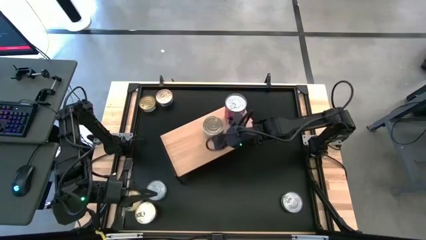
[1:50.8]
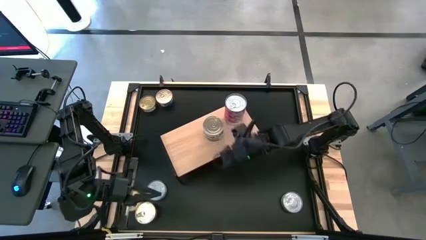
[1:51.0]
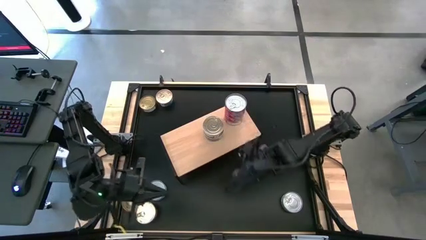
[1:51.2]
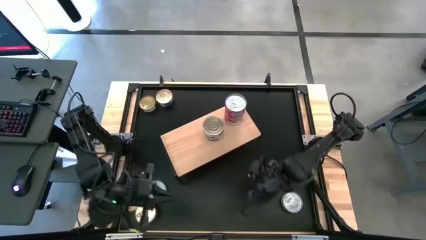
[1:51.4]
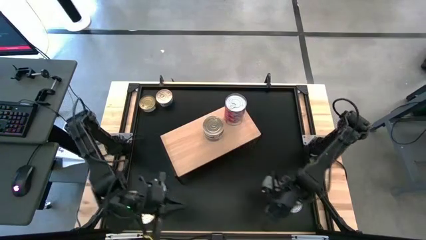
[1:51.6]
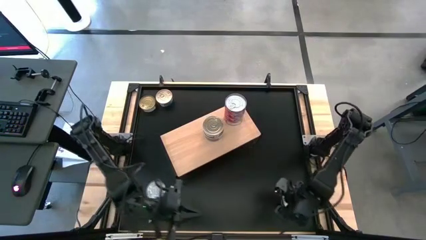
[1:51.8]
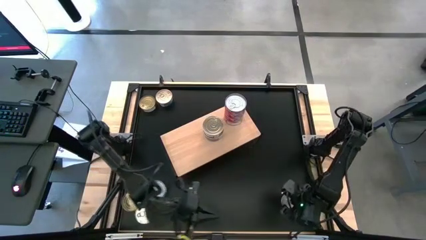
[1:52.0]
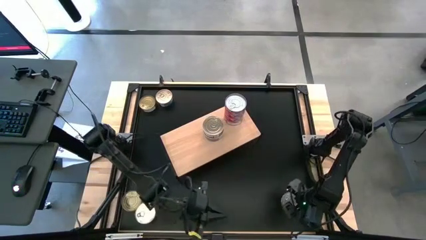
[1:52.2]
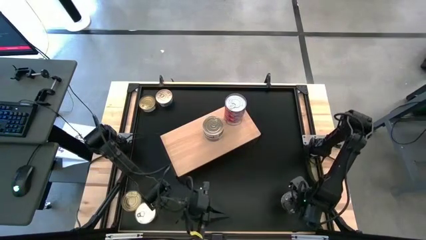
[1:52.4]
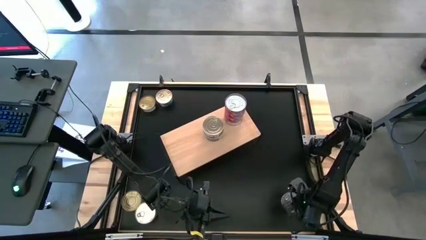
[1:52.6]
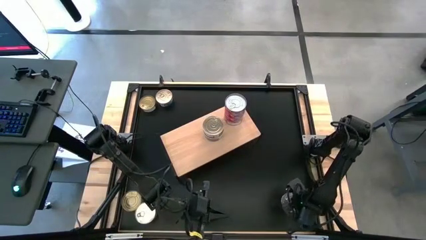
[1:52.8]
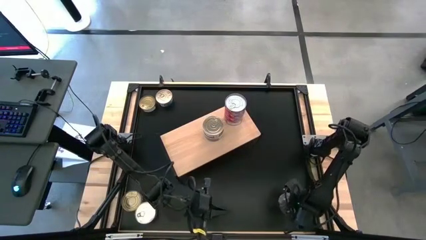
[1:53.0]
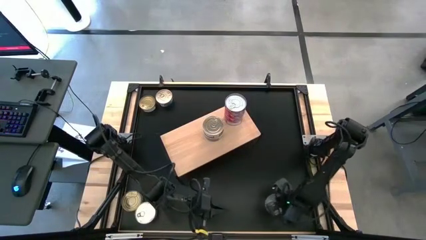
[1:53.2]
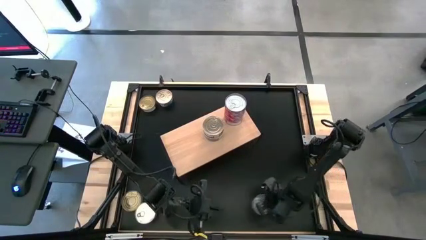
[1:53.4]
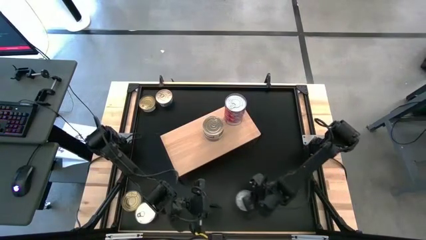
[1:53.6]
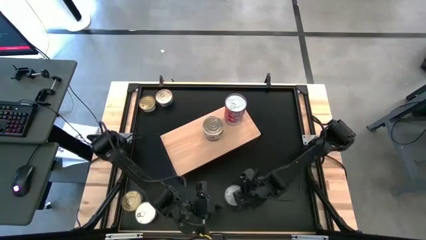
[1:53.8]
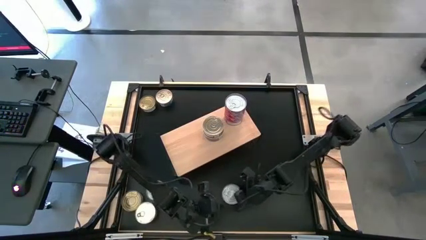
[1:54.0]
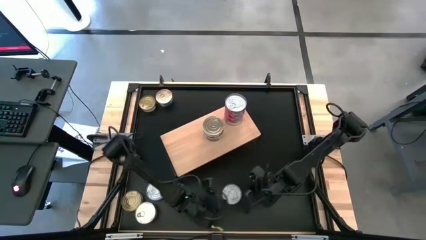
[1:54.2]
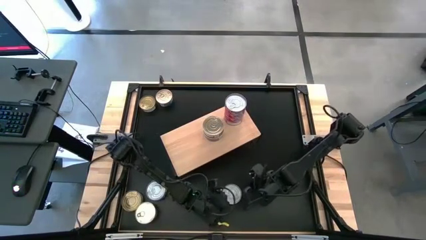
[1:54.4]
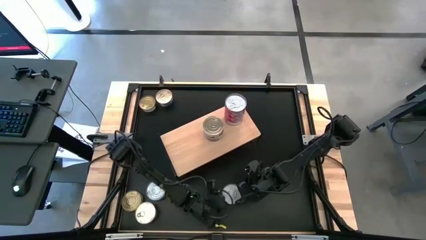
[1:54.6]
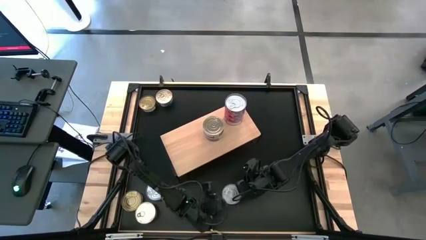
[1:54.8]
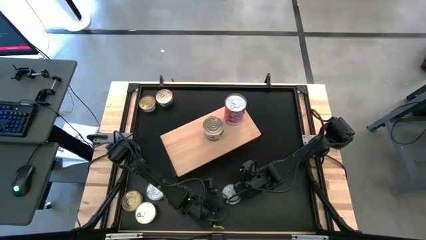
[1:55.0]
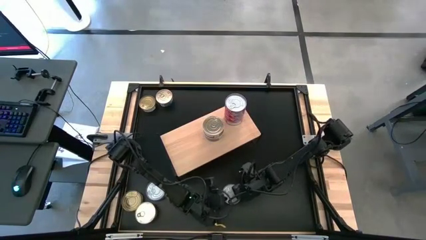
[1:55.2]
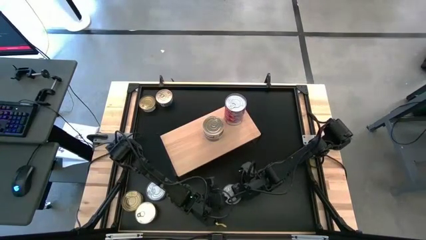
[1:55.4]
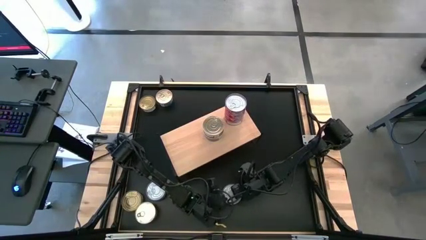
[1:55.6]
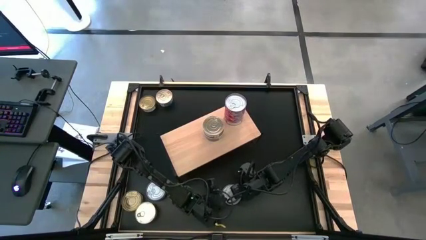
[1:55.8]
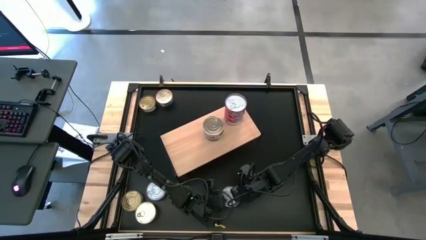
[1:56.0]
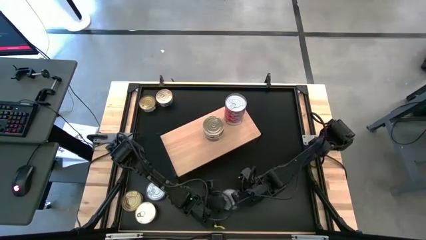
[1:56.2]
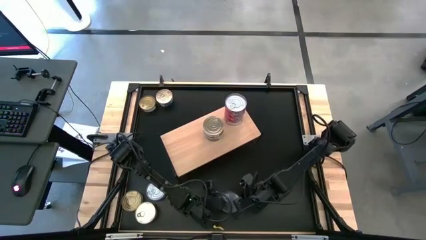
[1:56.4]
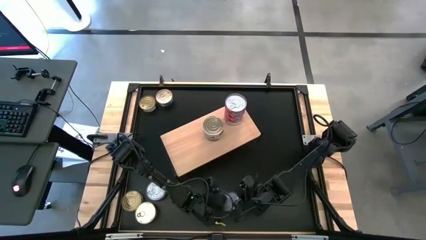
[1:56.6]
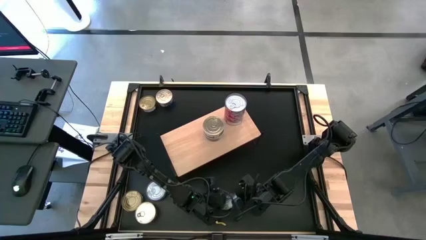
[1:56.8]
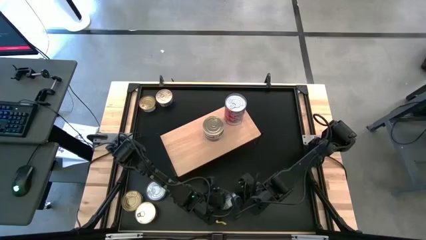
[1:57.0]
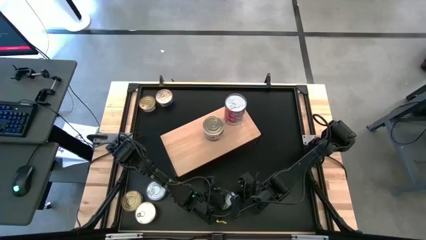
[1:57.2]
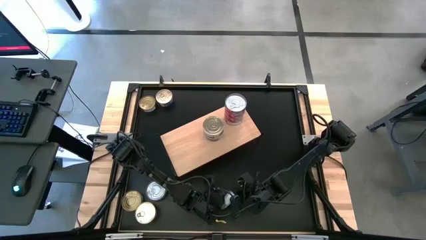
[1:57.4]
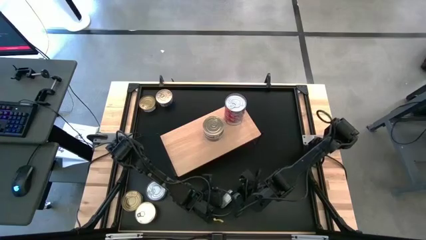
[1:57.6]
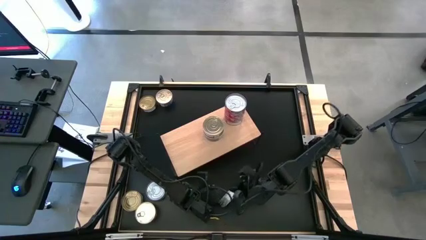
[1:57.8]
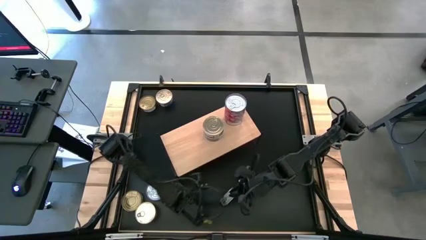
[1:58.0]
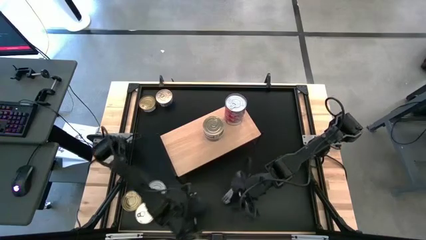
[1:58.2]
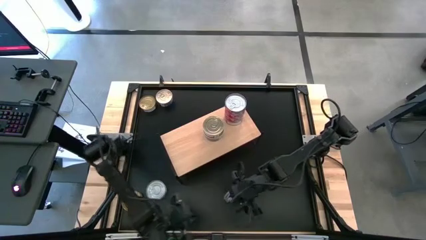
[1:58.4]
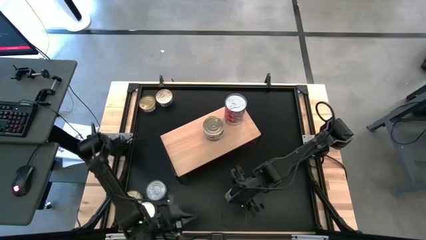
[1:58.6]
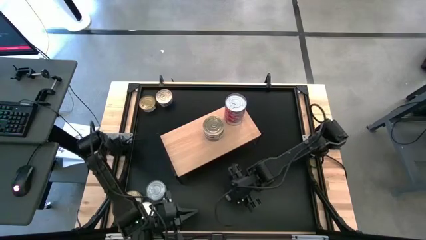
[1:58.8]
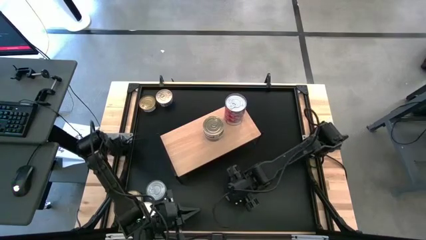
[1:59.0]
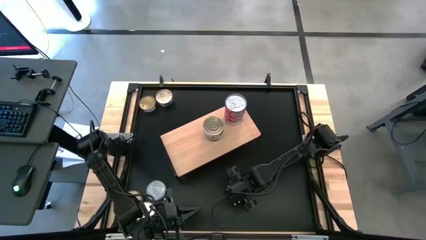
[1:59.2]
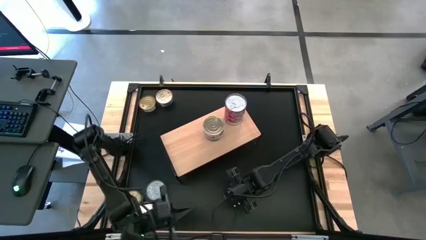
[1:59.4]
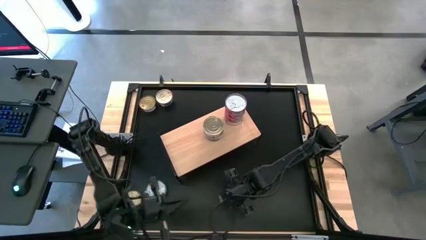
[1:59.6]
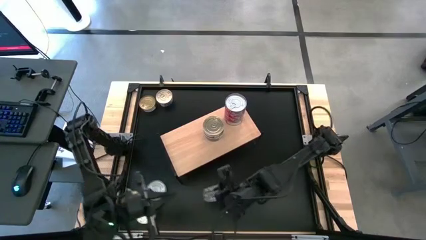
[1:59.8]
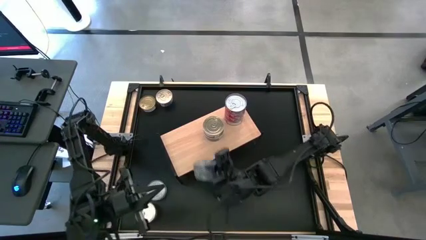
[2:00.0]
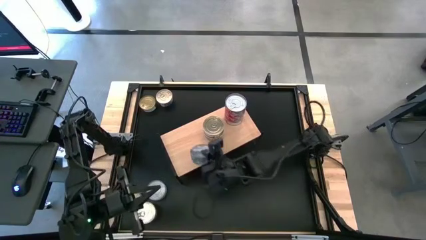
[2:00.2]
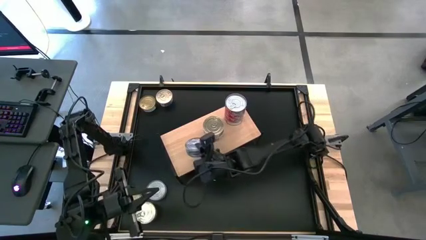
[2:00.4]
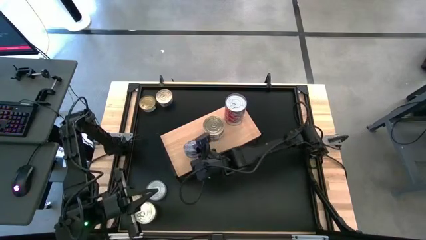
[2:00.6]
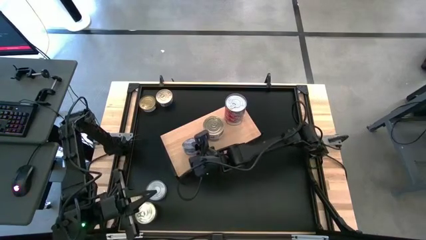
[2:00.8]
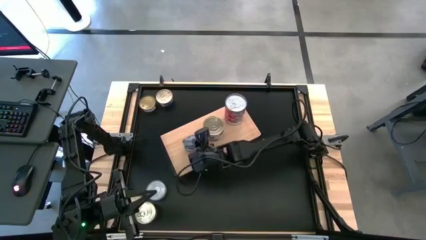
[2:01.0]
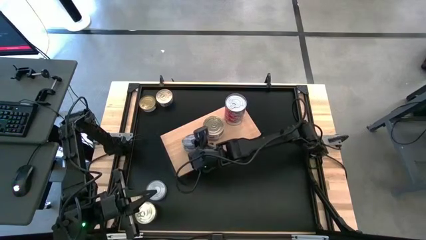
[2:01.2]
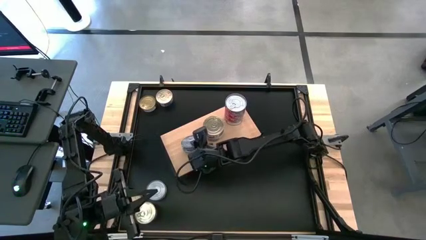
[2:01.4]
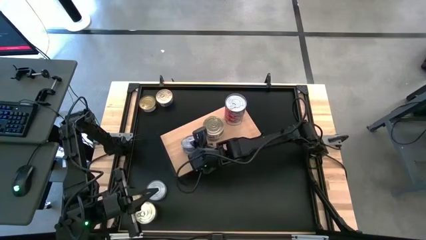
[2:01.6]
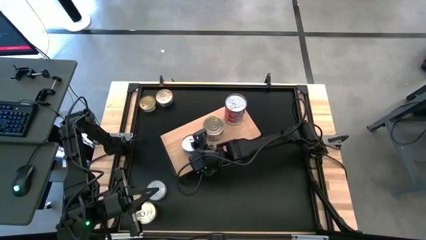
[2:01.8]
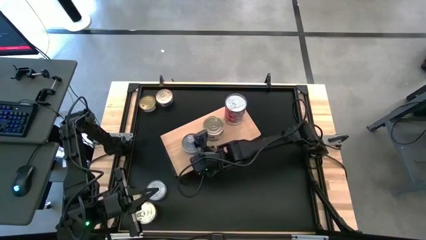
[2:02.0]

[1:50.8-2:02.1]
Task: Stack canned seafood by type on shelf
Put the green-white tuna can on the shelf

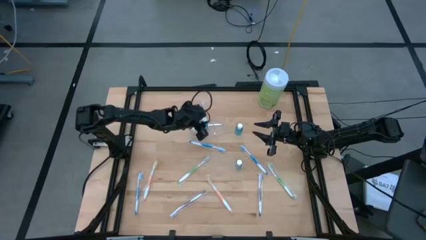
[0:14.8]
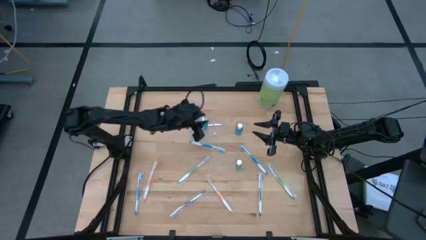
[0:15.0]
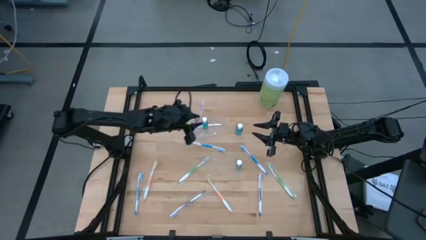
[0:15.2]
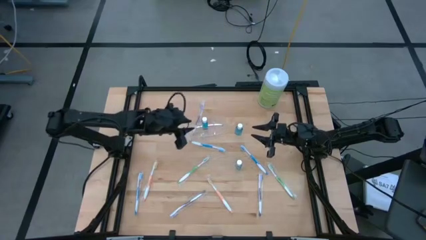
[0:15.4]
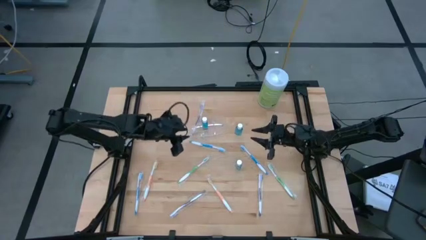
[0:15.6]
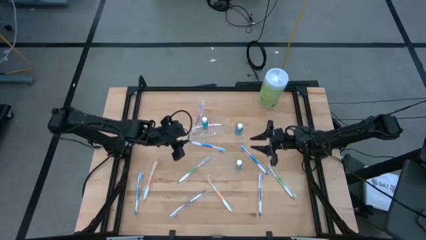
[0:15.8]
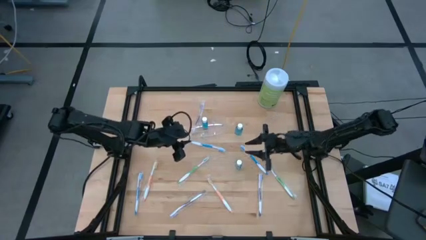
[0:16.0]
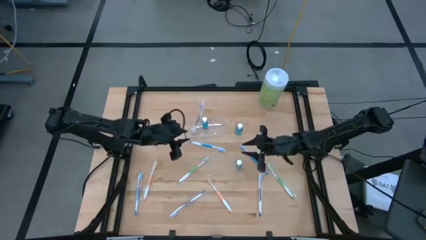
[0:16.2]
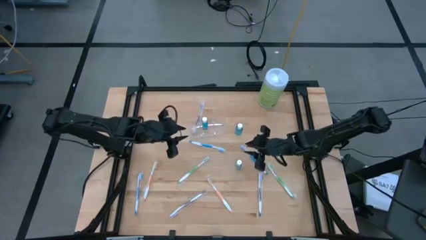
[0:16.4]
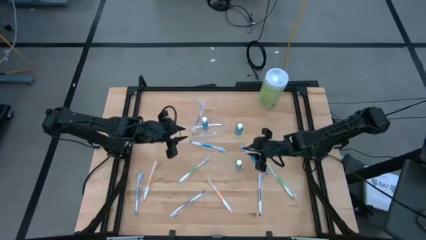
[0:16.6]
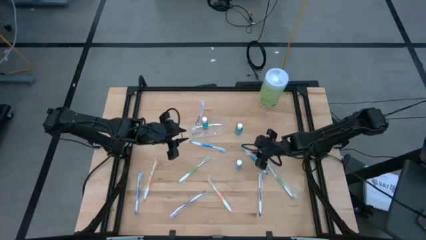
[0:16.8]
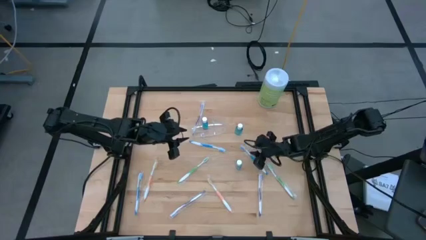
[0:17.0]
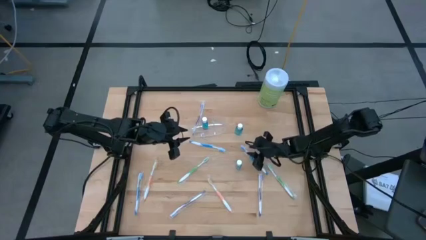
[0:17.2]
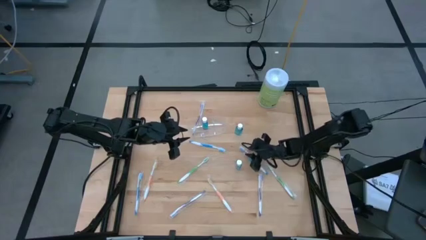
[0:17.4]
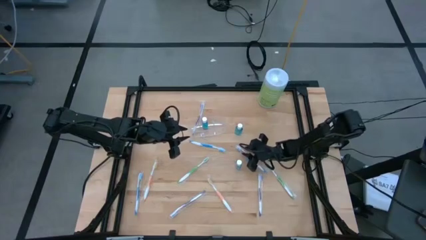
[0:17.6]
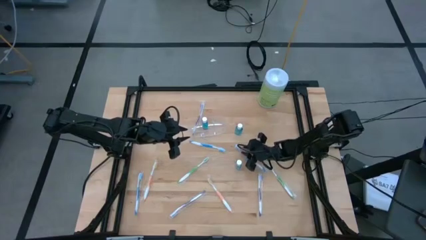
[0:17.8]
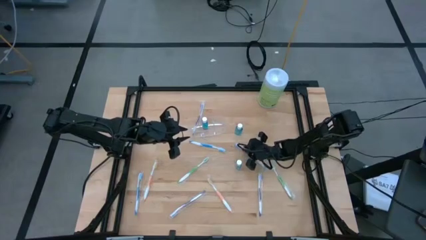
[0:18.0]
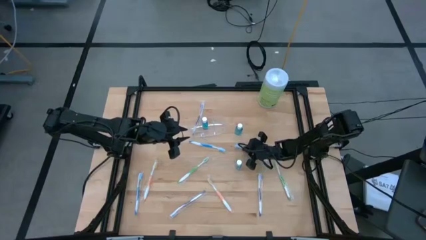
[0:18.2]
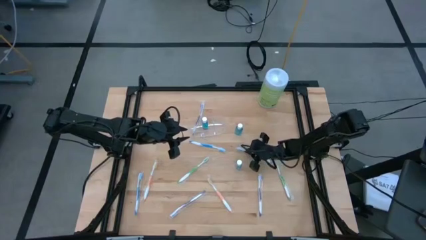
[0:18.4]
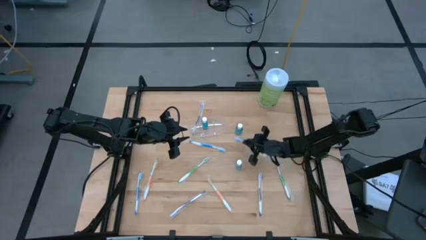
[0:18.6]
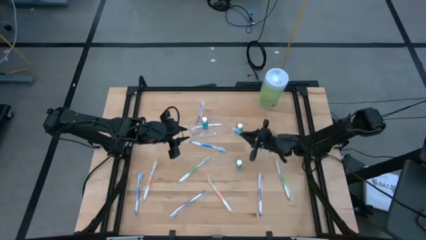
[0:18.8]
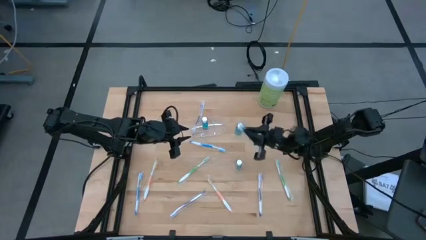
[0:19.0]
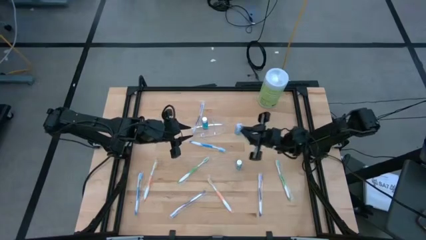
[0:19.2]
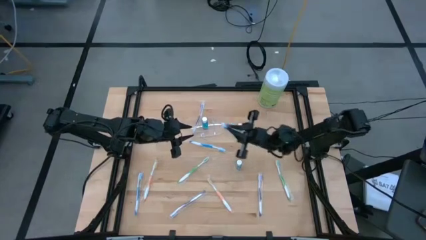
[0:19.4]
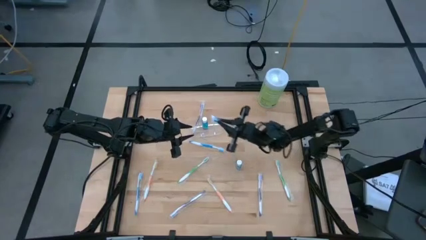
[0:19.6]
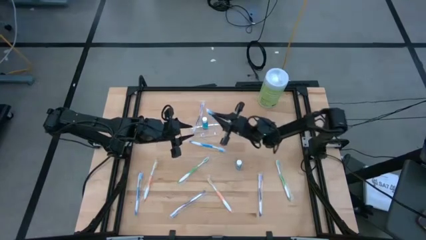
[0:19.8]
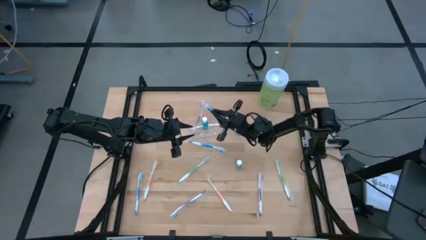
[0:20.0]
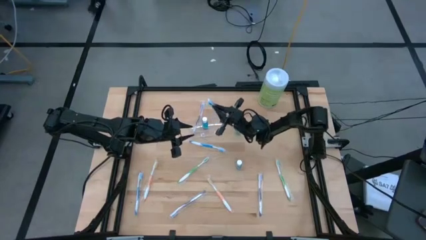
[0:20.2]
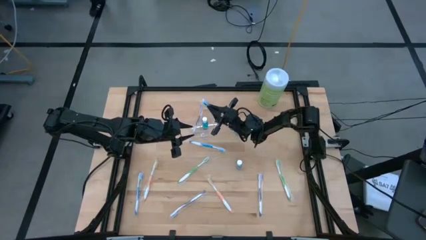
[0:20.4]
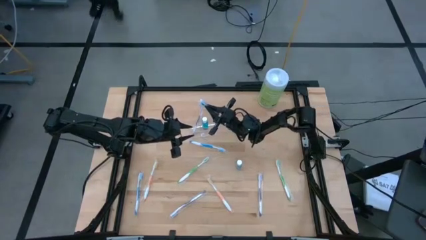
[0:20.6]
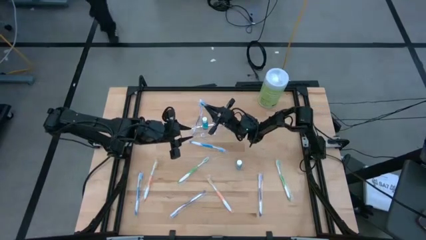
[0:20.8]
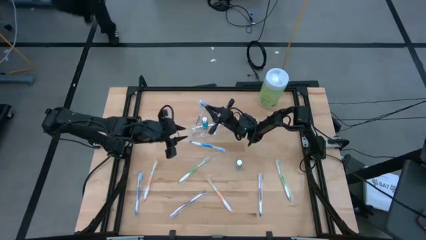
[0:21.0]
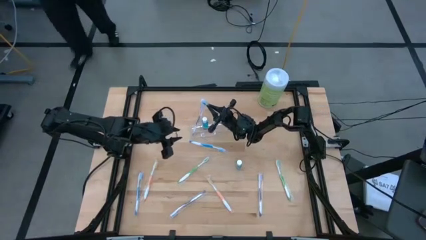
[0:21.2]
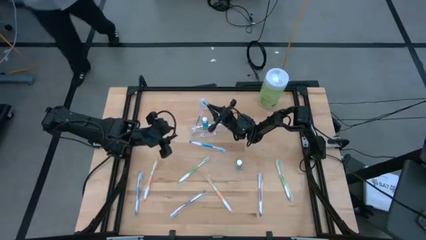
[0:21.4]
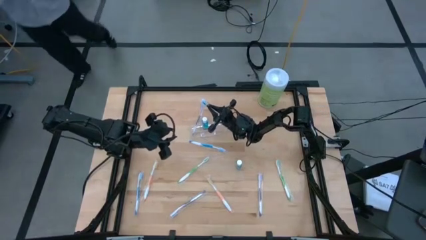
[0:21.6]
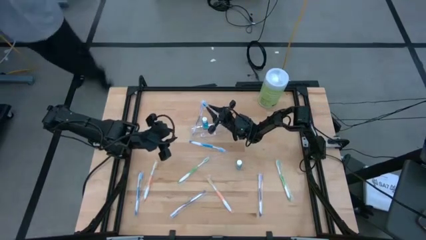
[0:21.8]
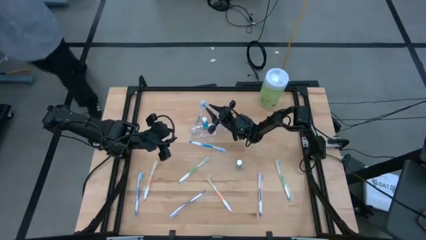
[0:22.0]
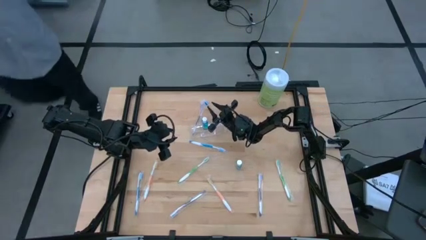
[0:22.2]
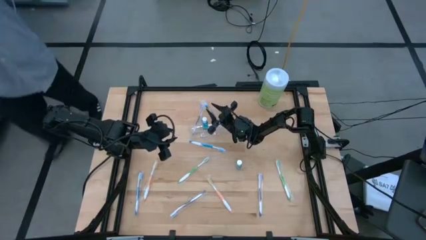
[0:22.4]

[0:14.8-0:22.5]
Task: Pick & Place toothbrushing station
Put the top right blue toothbrush into the transparent organizer
